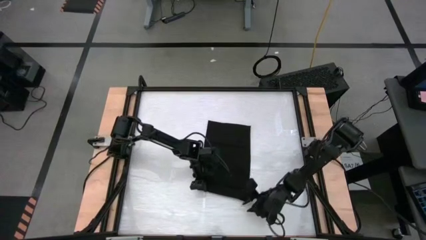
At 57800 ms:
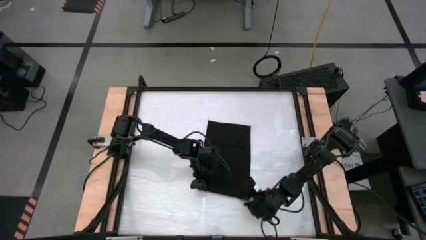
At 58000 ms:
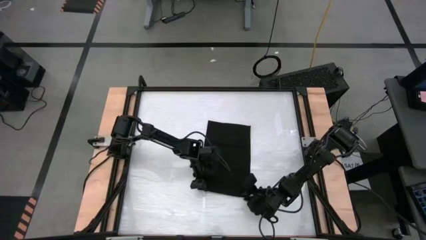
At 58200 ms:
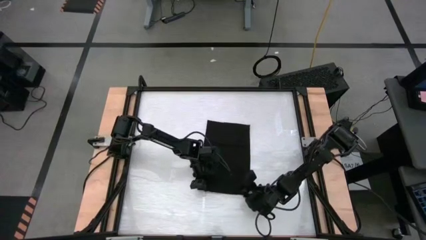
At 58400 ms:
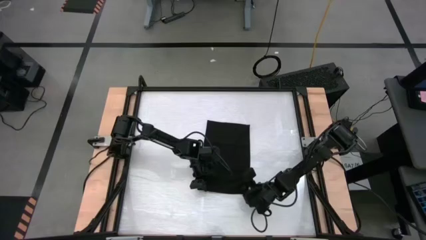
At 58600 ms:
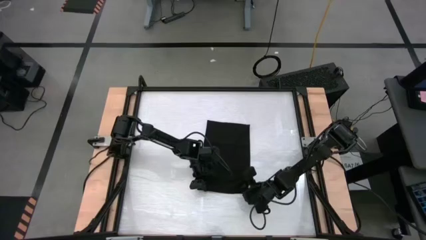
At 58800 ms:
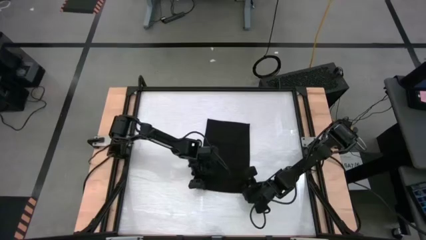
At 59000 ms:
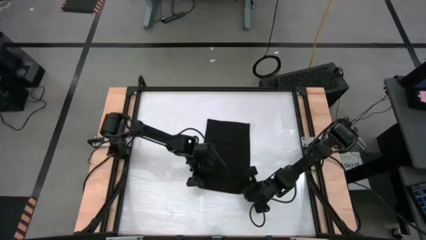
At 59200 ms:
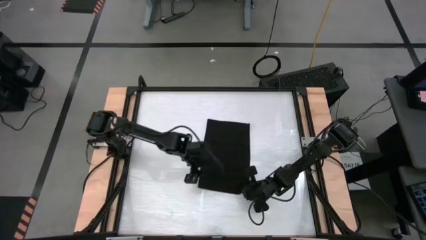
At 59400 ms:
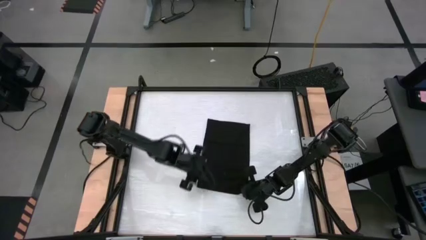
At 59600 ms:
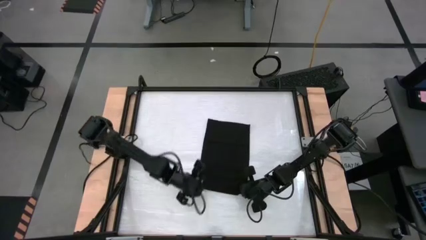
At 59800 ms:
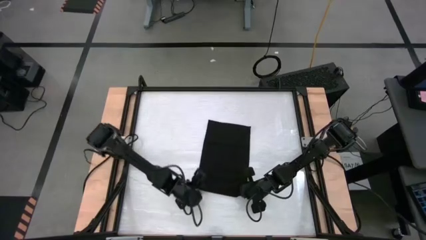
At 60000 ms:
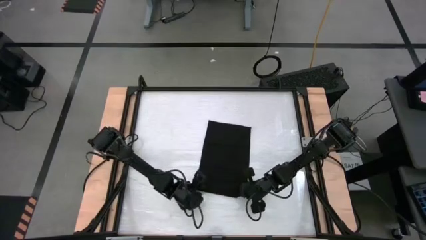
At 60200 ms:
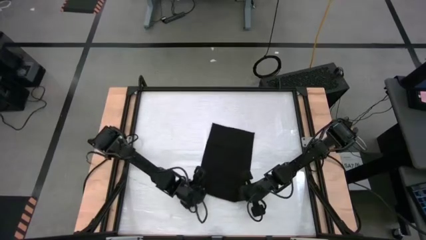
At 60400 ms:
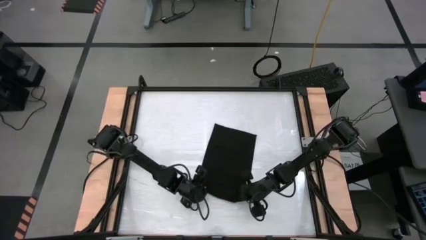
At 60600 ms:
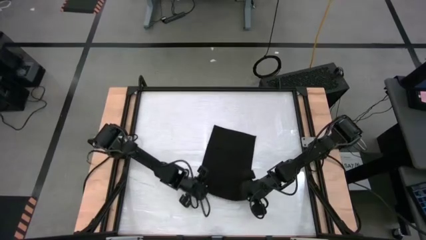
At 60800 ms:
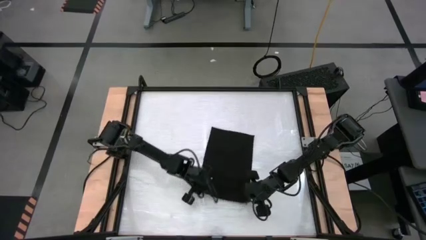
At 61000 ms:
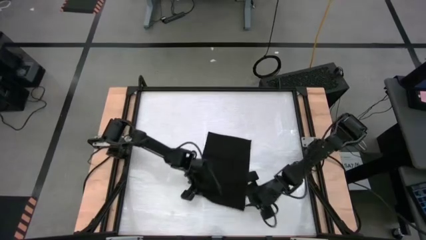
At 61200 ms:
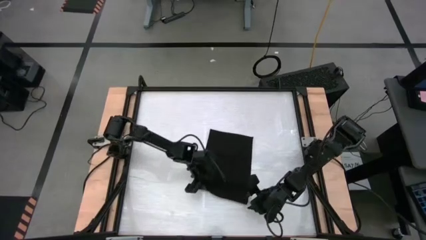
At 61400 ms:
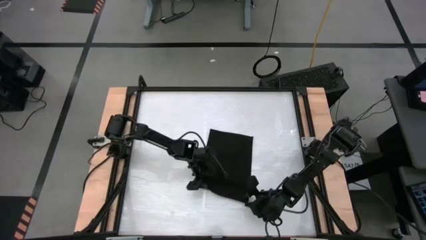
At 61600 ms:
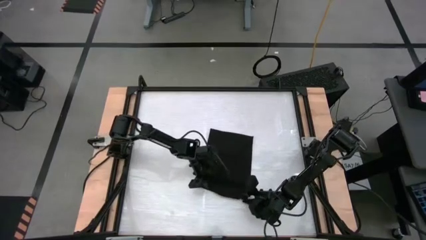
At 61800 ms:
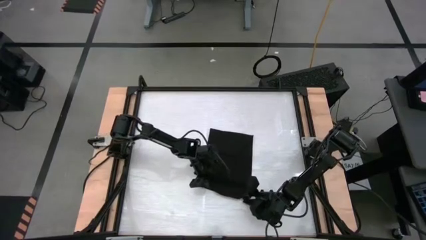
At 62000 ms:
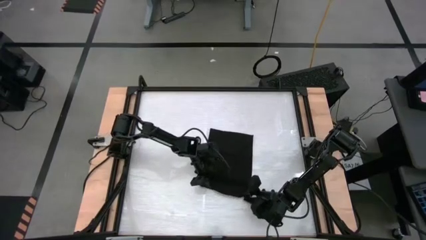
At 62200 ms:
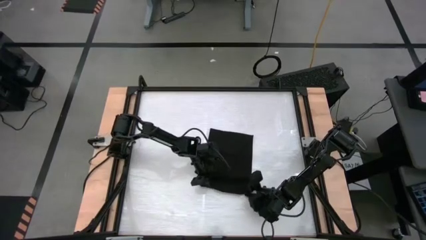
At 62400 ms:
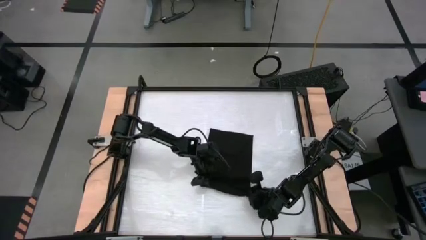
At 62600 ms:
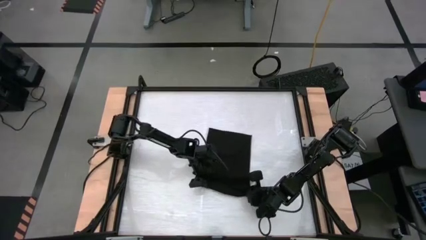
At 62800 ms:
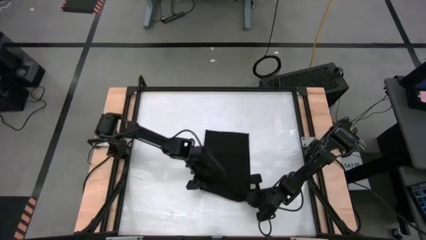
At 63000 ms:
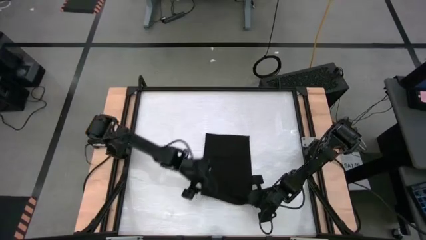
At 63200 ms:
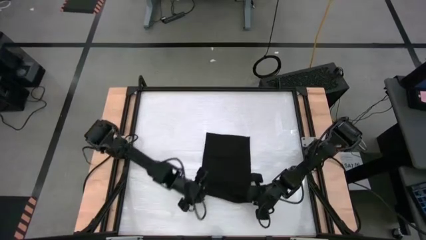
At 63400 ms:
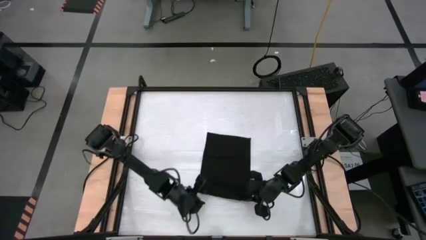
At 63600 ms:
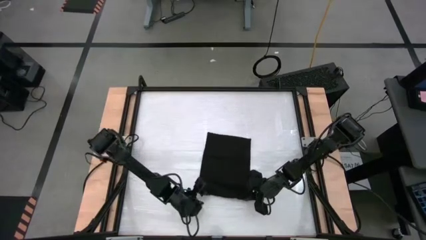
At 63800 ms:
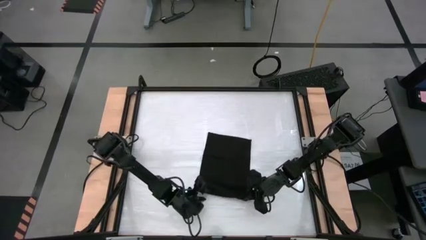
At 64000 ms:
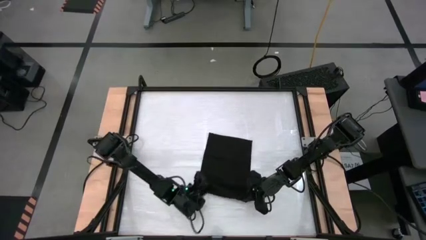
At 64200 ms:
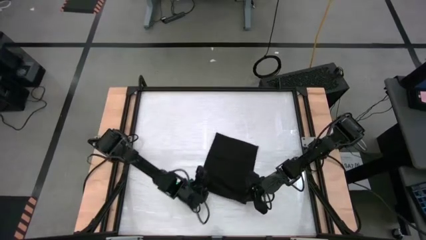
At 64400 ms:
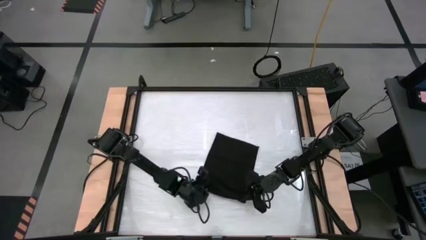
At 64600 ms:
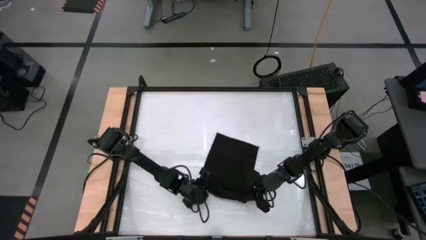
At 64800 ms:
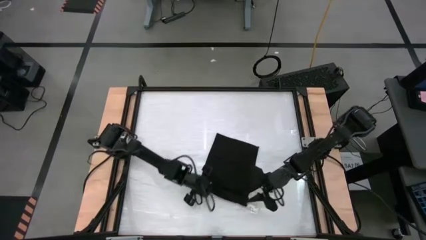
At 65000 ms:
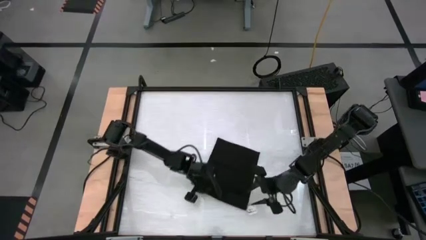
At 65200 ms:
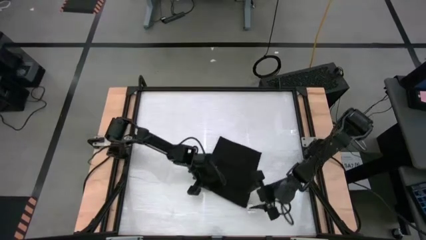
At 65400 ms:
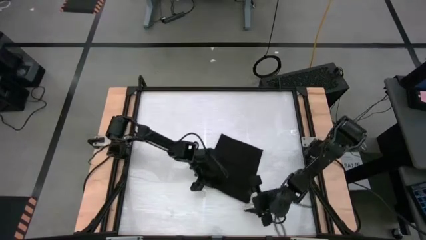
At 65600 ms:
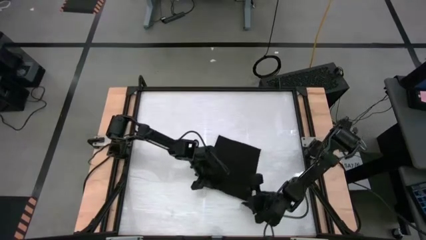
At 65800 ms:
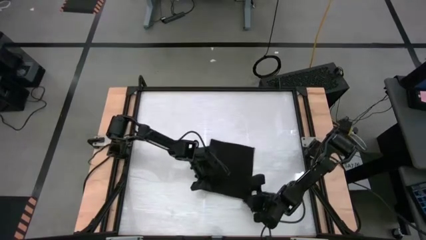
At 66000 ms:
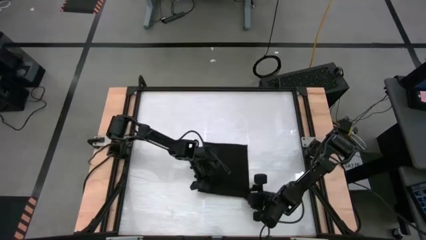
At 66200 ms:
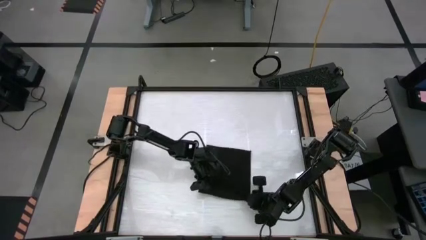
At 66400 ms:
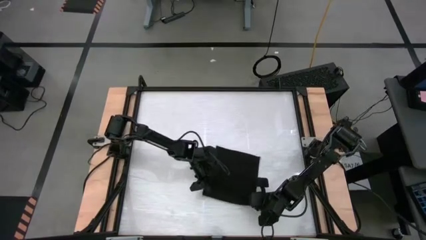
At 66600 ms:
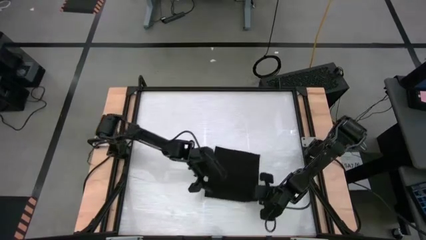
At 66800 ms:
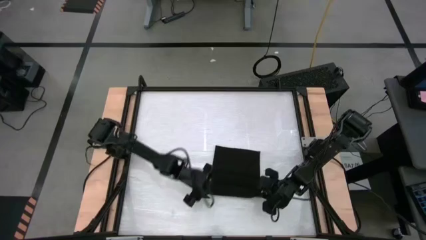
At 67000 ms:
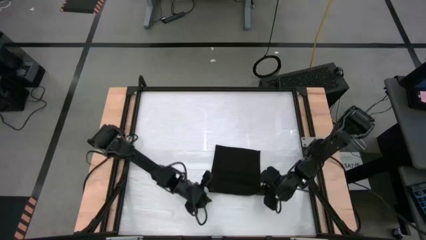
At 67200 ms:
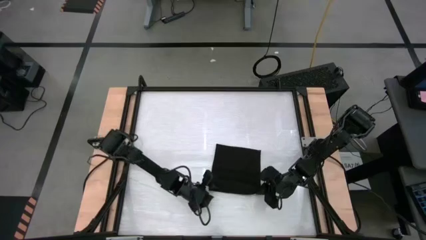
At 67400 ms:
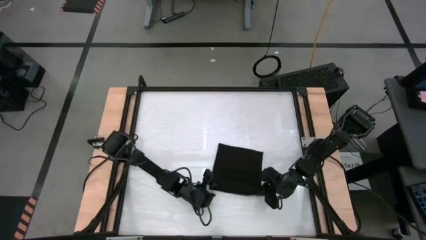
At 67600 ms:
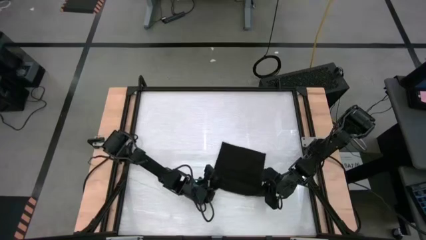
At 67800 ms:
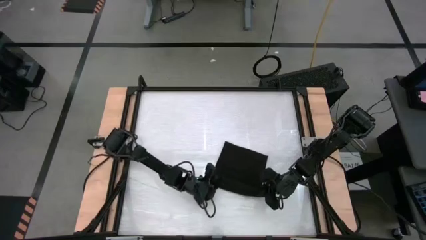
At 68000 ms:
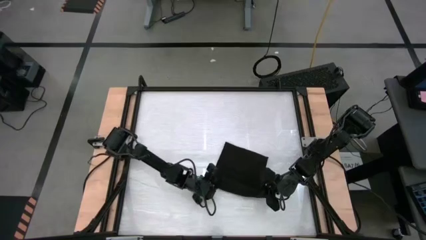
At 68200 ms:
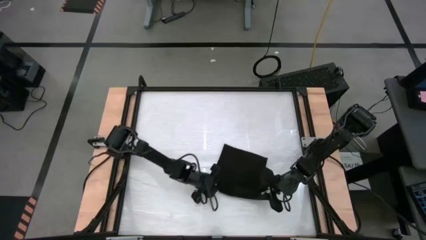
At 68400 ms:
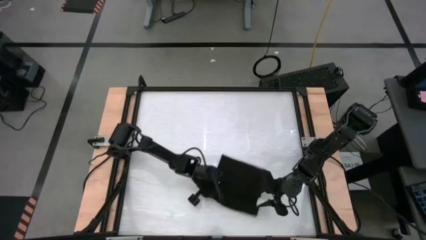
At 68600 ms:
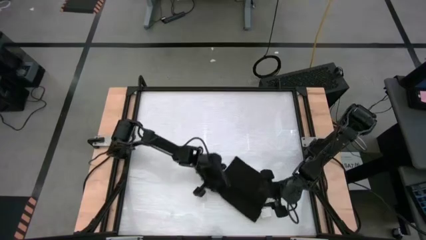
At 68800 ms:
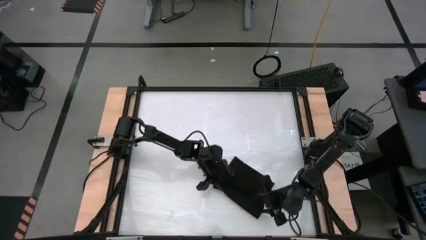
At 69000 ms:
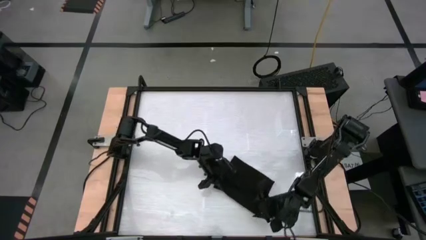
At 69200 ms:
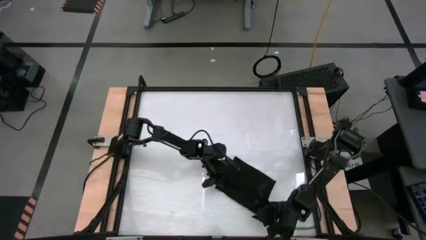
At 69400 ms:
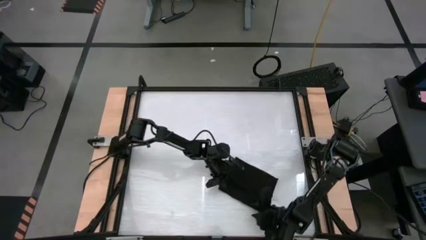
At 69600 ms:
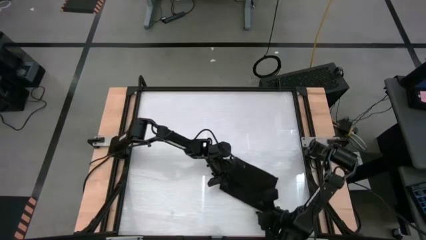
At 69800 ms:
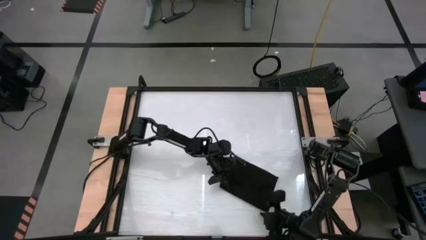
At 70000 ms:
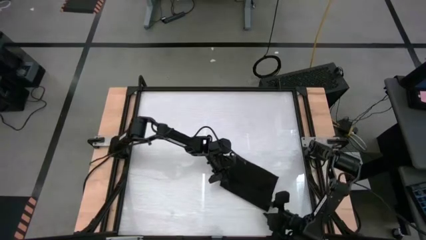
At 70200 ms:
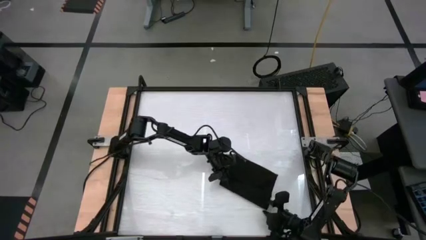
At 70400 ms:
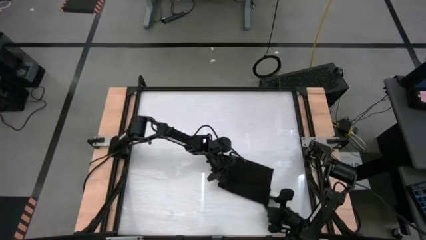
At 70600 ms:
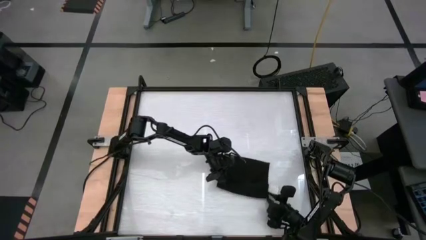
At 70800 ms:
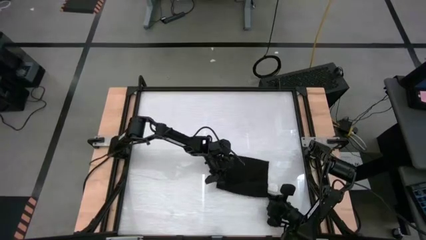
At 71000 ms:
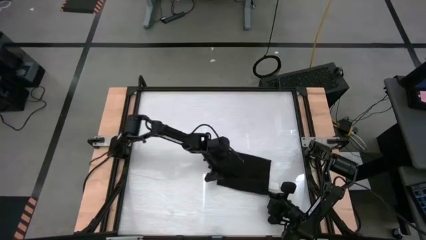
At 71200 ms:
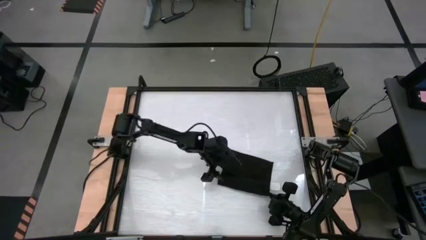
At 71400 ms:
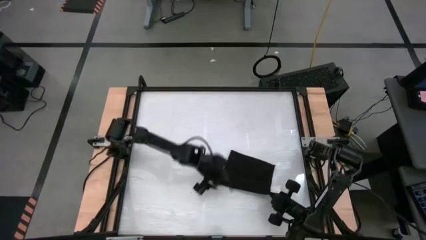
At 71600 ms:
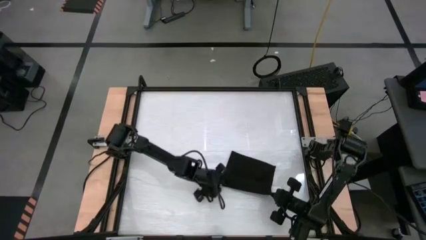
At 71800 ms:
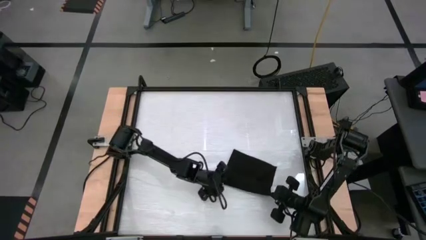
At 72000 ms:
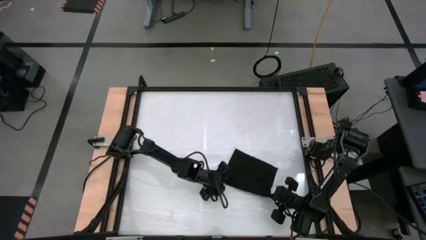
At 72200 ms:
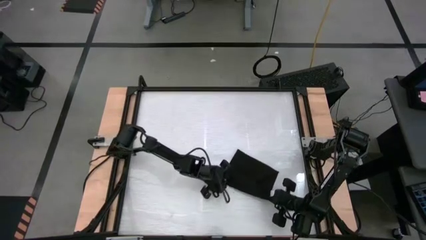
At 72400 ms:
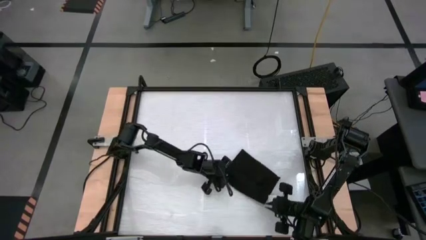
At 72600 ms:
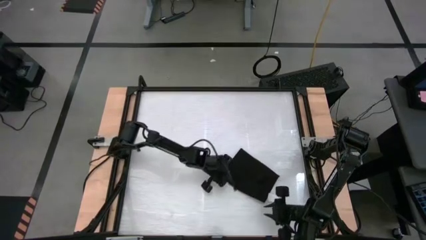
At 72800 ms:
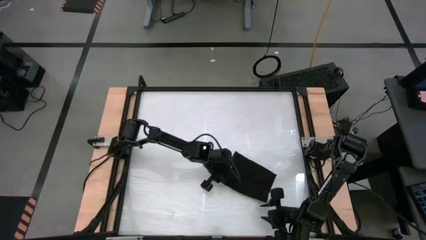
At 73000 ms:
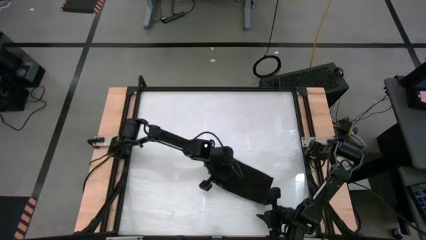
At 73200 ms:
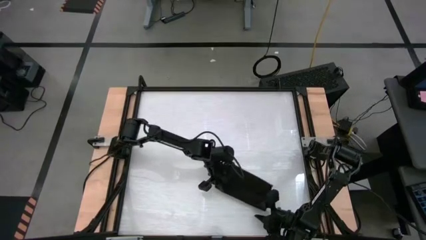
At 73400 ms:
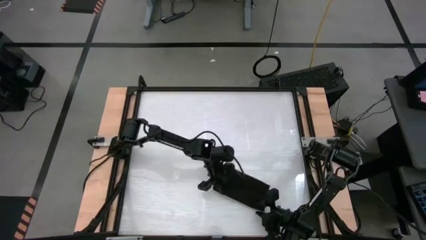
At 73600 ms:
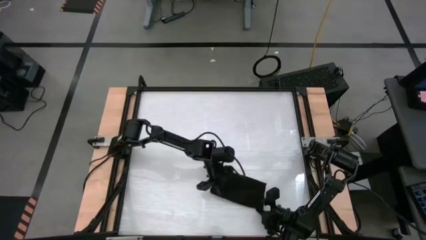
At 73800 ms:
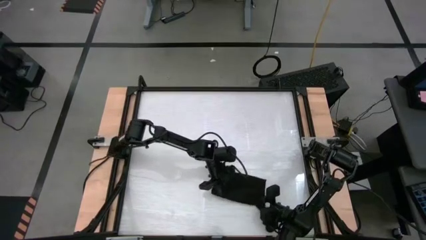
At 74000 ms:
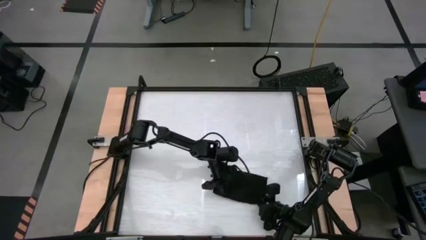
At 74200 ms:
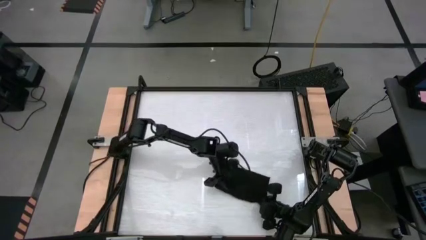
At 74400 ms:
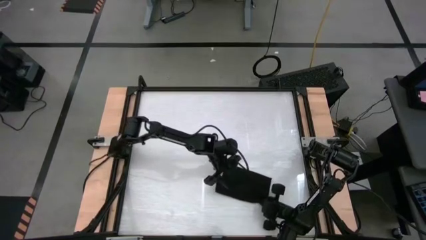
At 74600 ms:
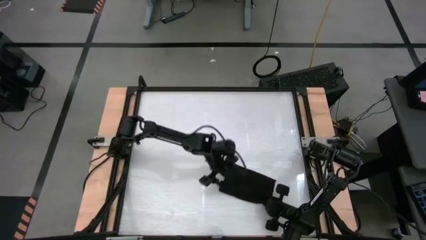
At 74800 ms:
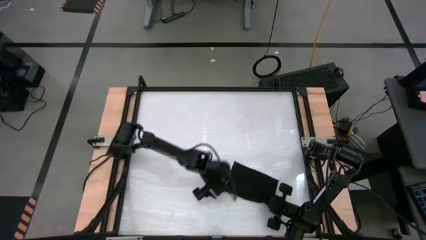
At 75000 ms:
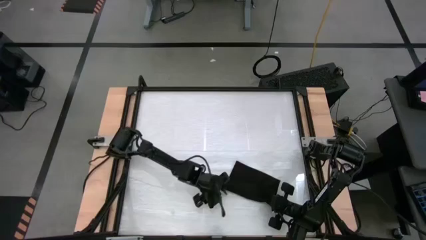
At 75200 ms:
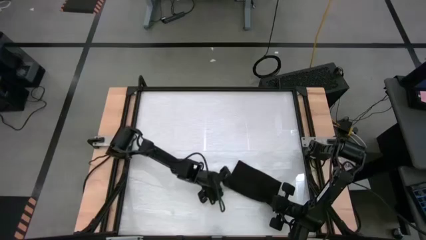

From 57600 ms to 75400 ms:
Task: Roll towel
Roll the black towel
